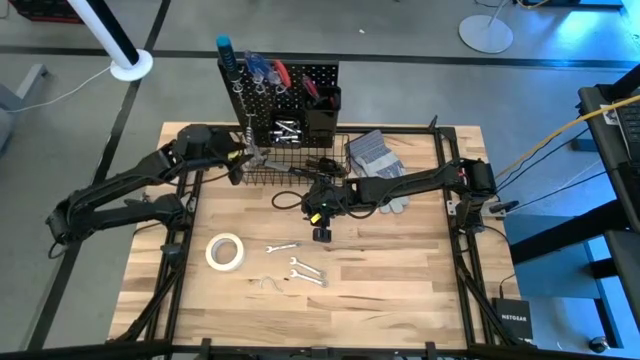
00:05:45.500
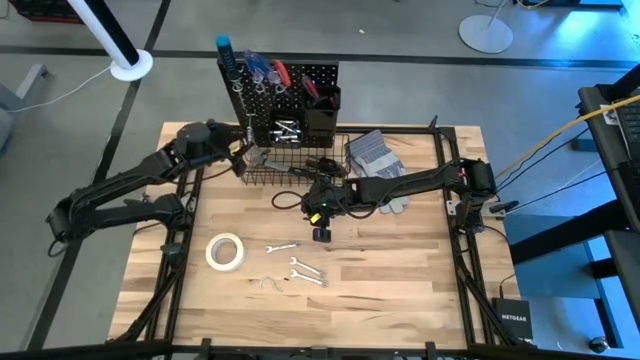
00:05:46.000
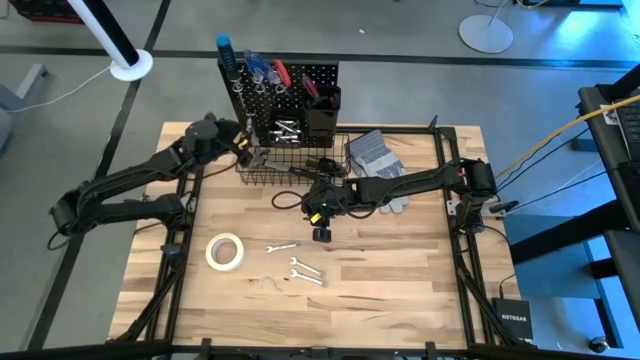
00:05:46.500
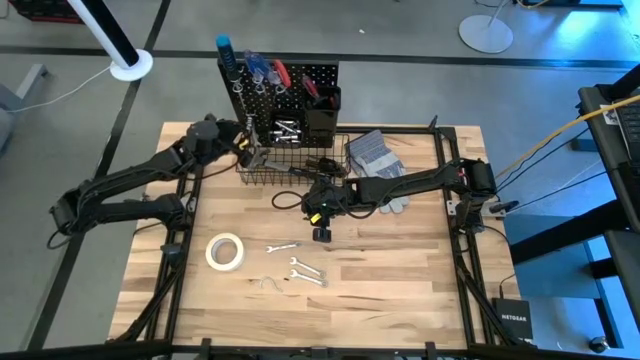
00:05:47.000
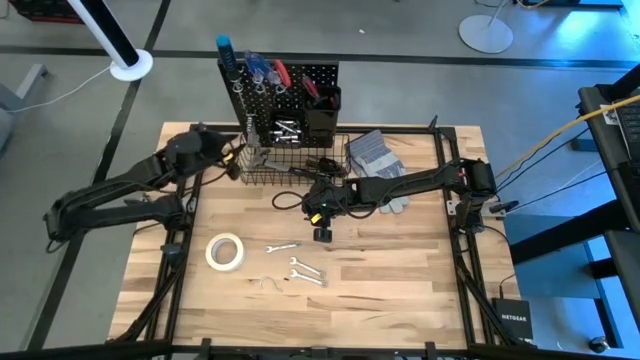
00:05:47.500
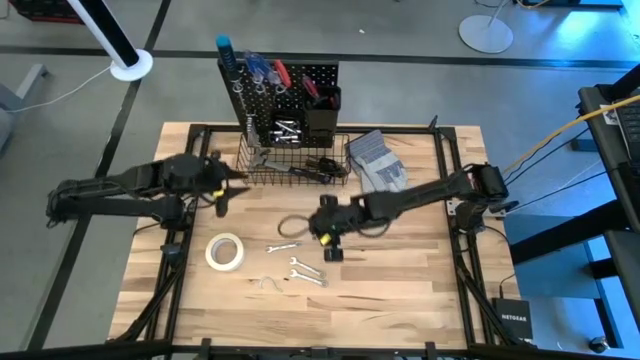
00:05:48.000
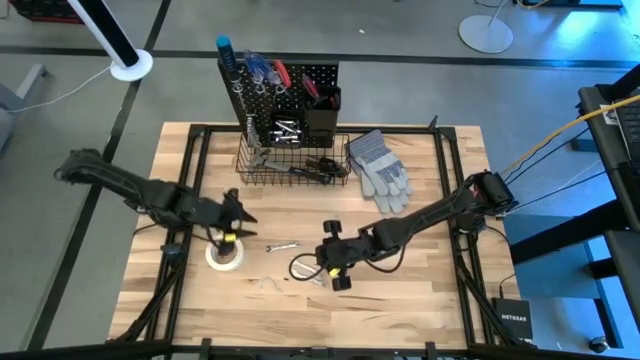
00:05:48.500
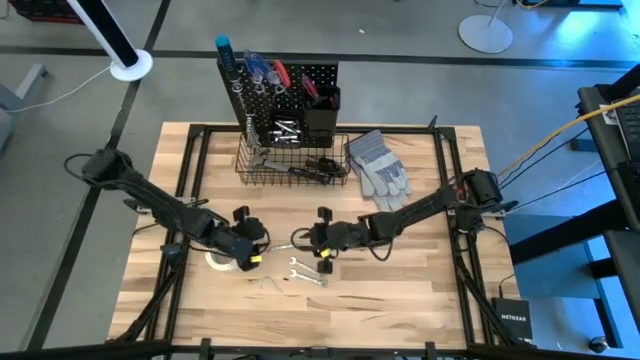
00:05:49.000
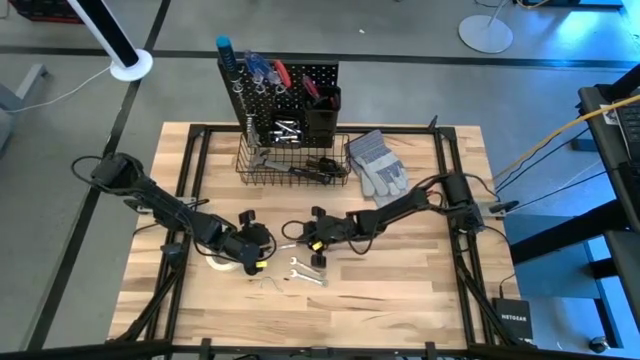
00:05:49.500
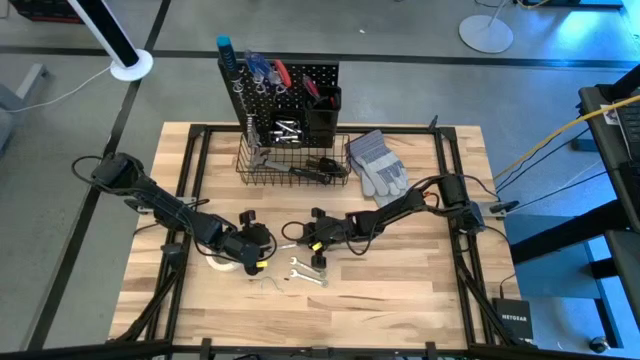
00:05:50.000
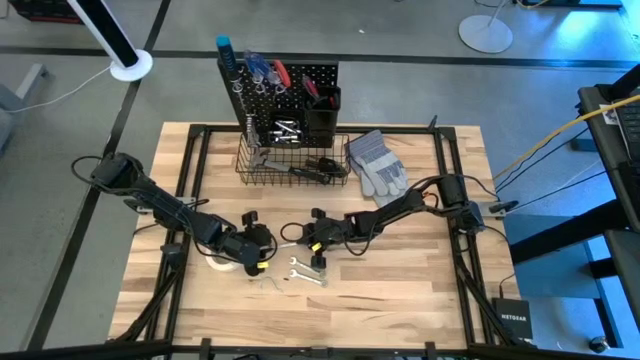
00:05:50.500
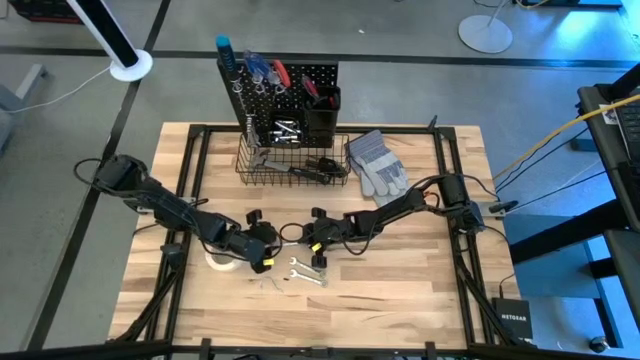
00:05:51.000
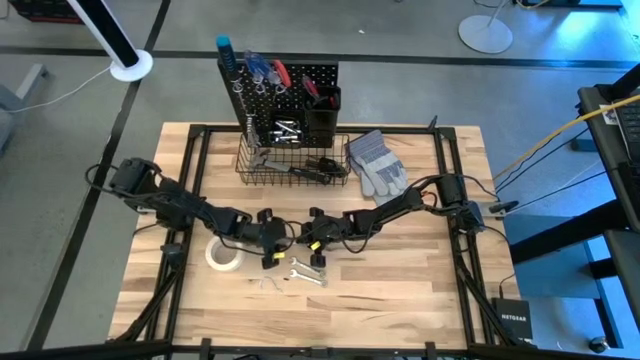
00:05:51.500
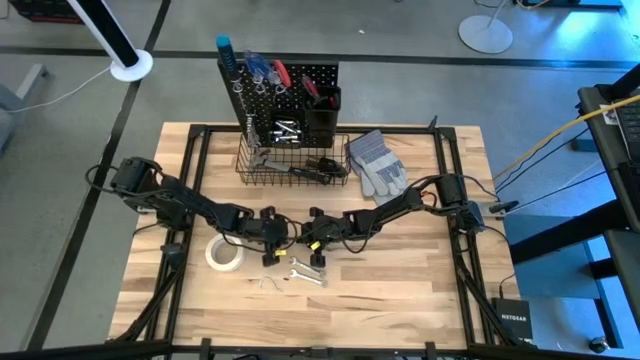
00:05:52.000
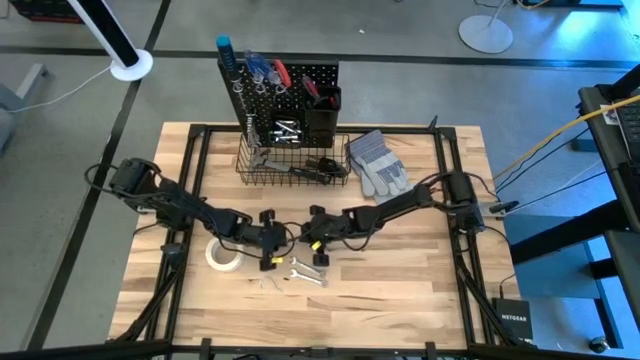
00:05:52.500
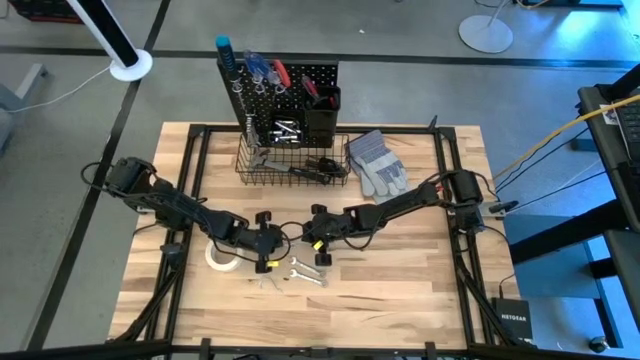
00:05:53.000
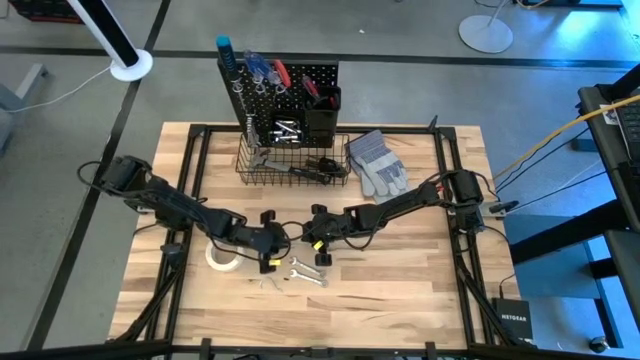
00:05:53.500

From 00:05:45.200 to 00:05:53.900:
Task: Hang tools onto peg board
Hang the wrench on the peg board

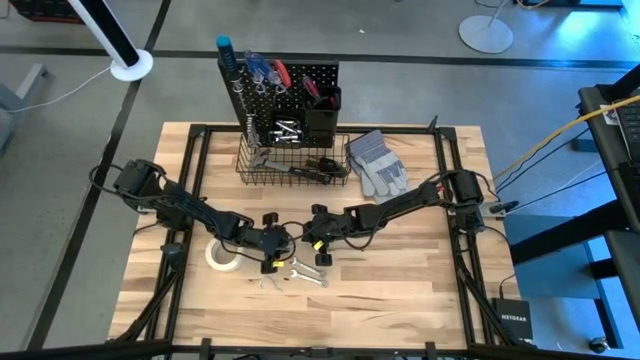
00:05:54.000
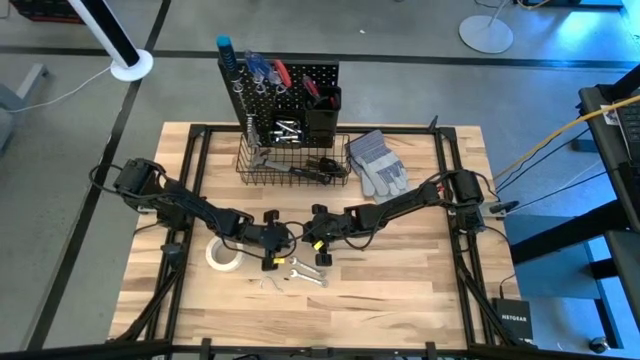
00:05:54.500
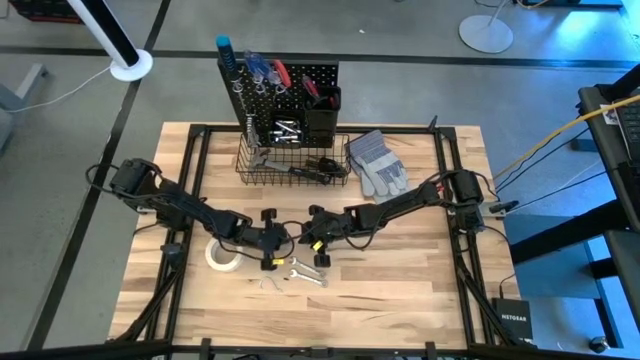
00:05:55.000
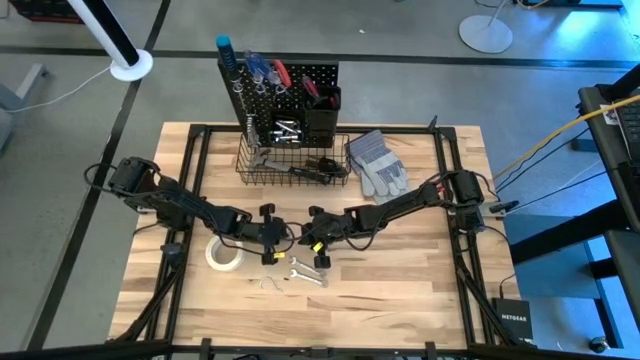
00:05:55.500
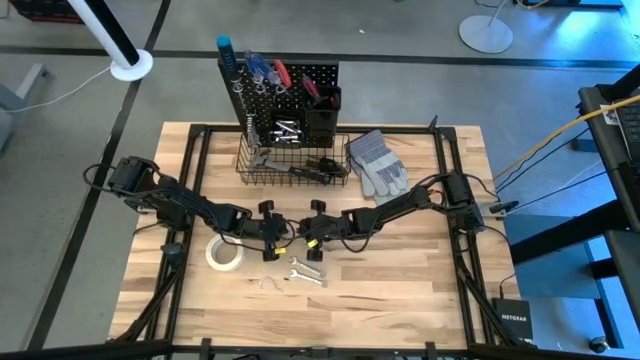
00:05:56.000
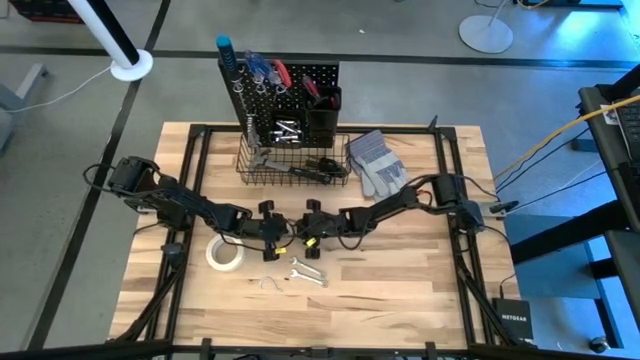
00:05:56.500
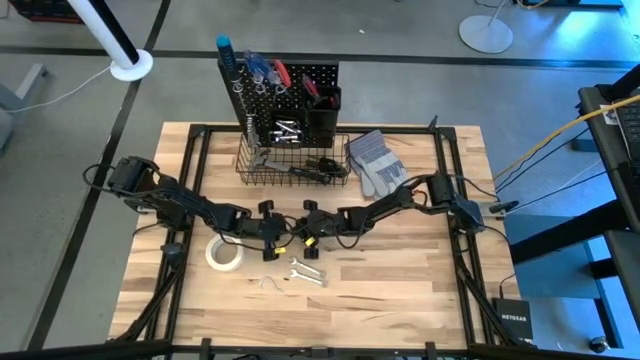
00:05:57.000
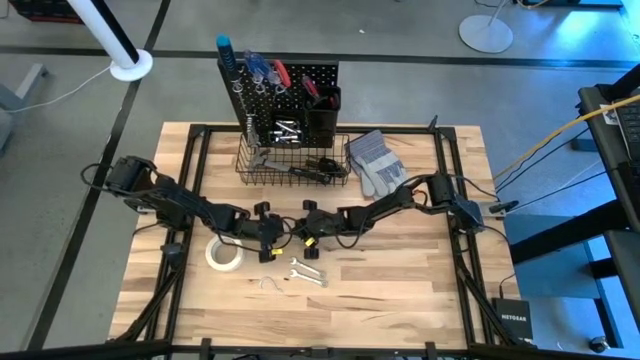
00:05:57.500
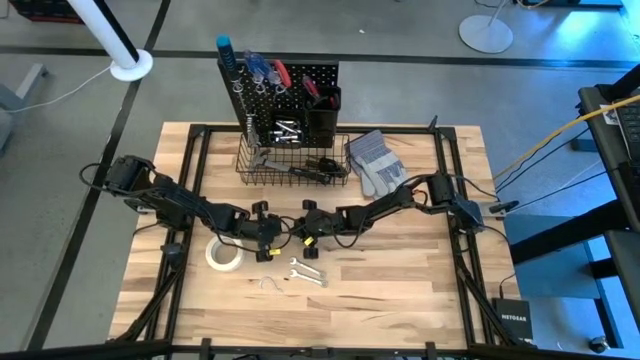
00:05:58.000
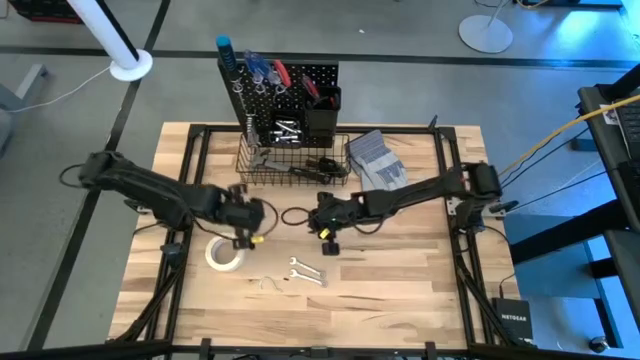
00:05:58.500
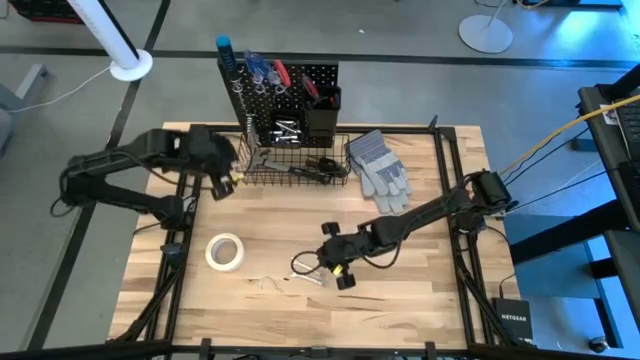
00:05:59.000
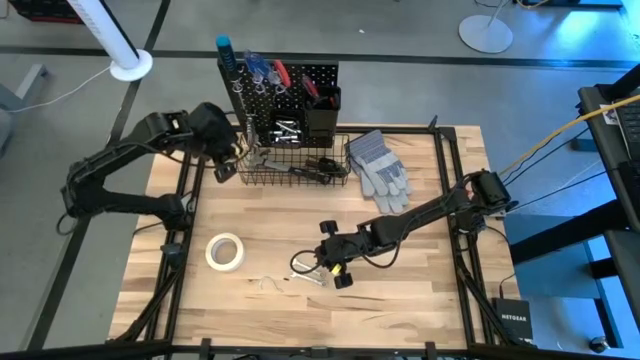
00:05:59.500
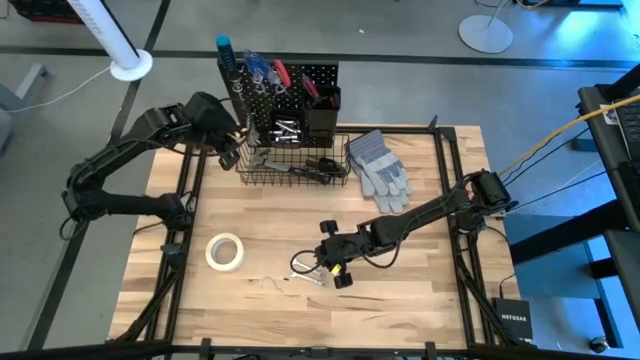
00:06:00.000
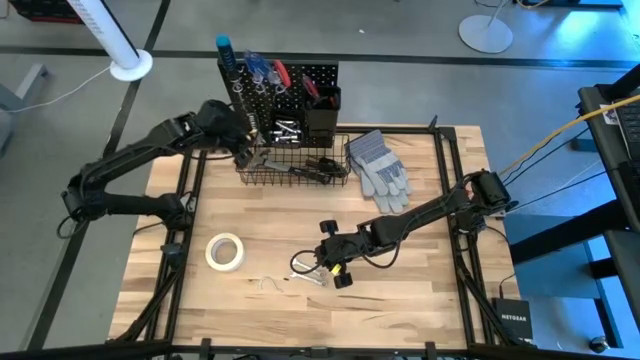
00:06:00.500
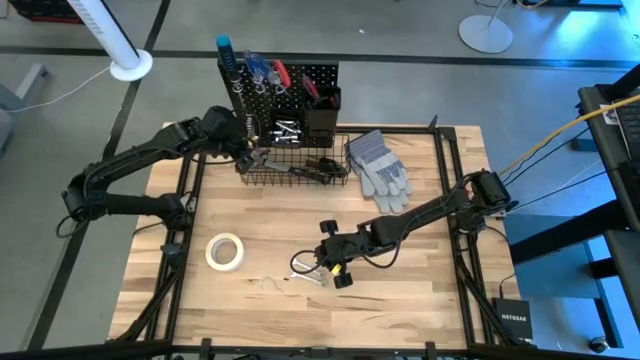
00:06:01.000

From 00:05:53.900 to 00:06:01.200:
Hang the wrench on the peg board

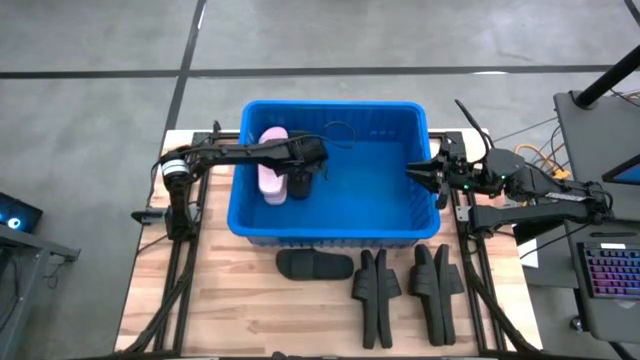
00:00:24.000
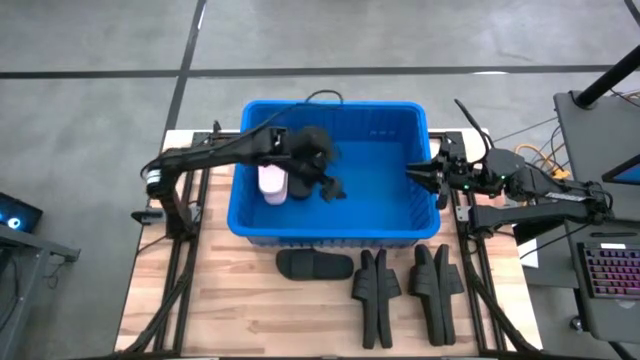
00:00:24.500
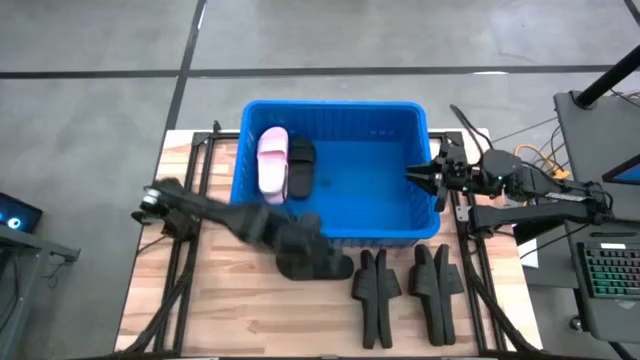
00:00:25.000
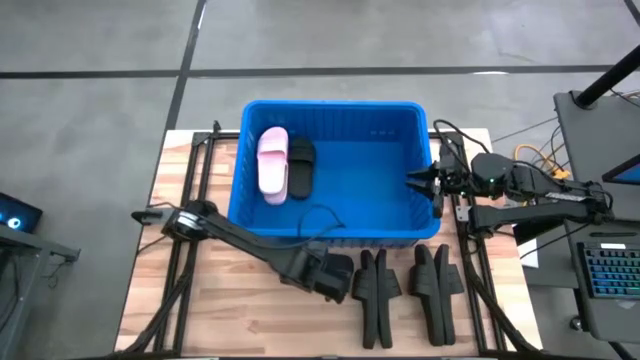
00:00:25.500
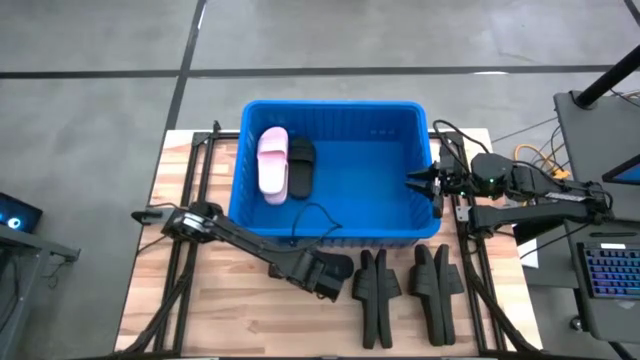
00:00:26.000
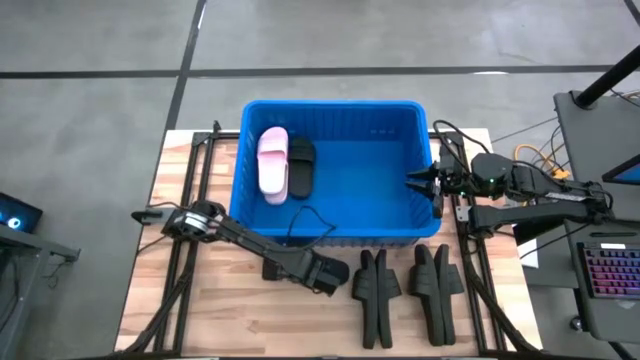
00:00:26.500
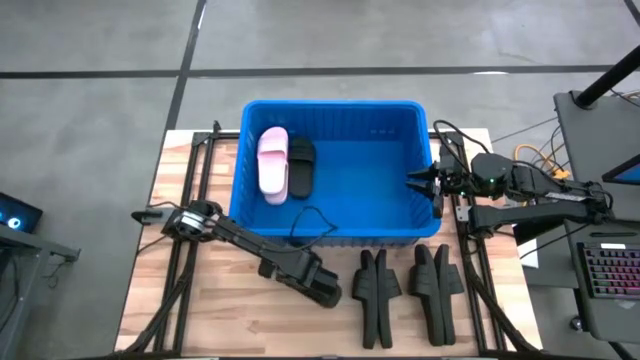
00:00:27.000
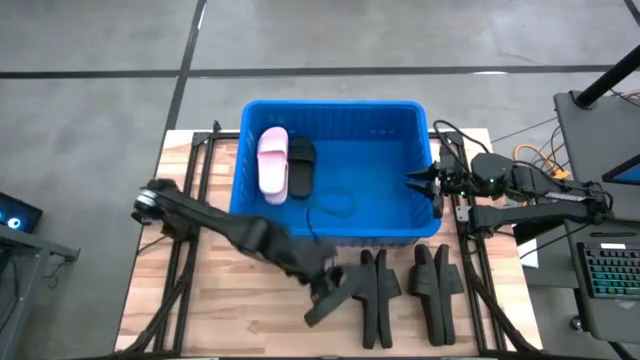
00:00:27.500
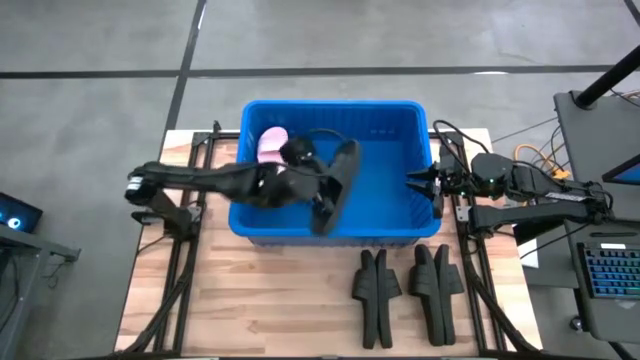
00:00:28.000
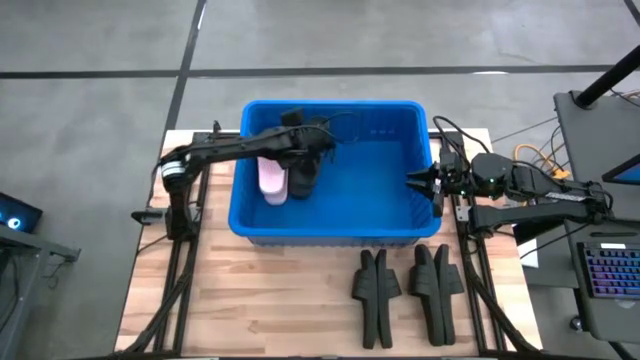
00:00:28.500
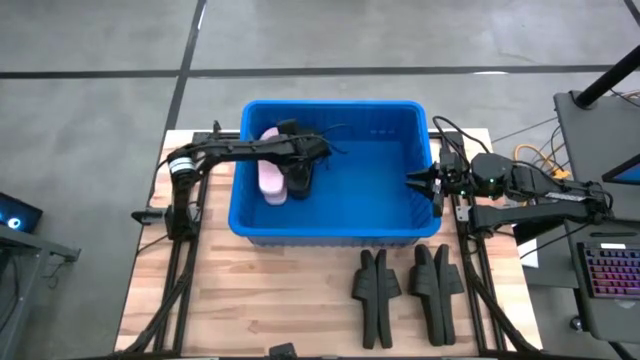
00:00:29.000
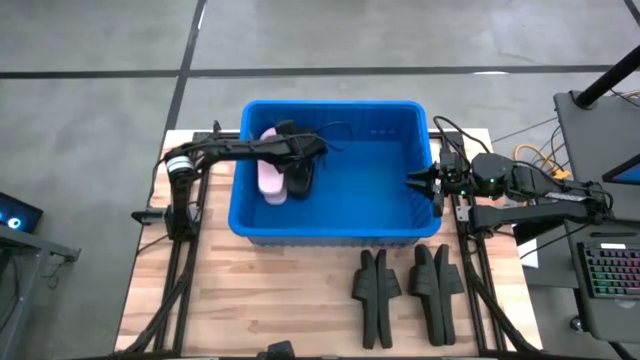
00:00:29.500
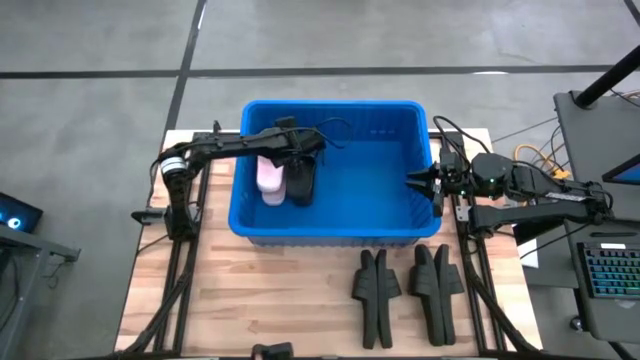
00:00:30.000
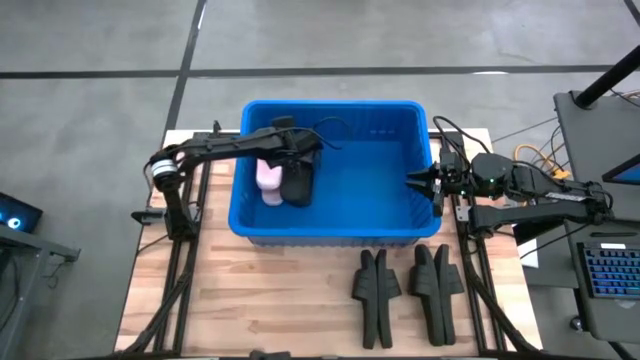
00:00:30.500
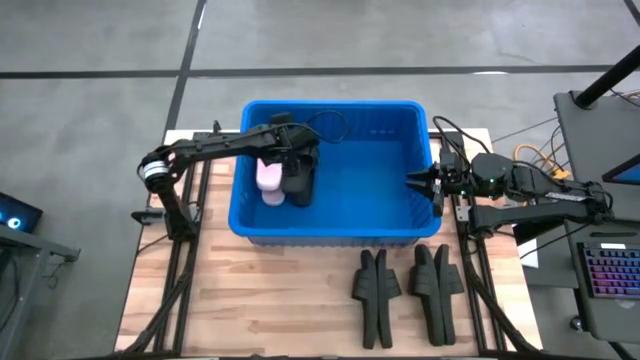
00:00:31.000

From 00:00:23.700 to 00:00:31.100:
Task: Pick and place slides into bin
Put the black slipper into the blue bin
